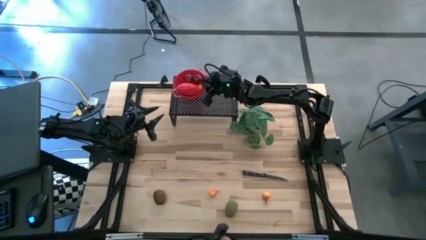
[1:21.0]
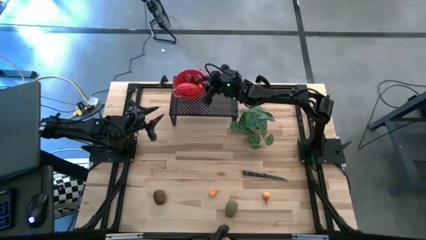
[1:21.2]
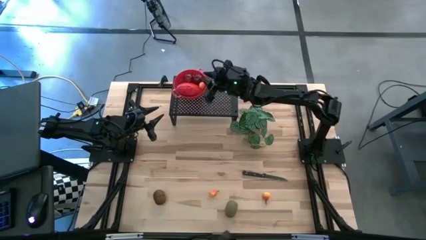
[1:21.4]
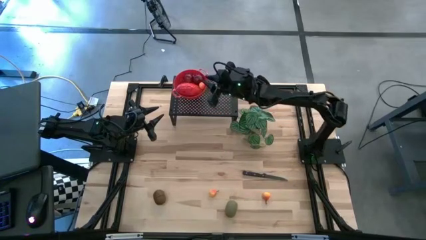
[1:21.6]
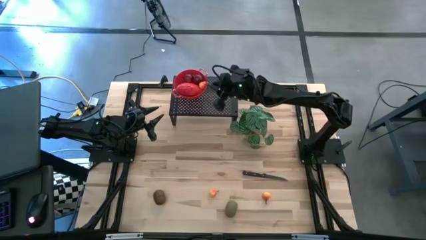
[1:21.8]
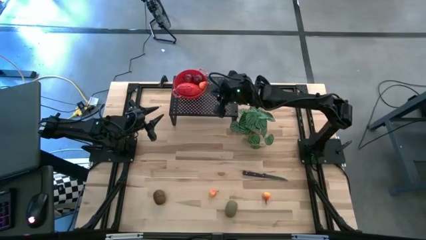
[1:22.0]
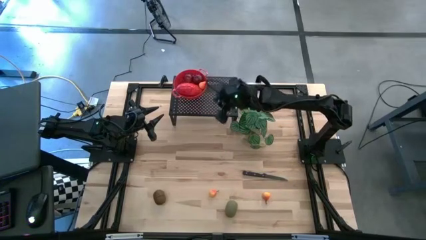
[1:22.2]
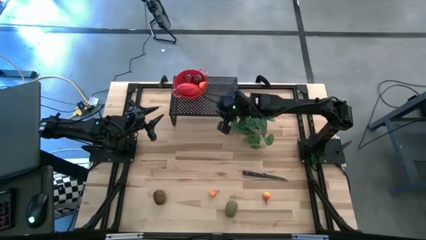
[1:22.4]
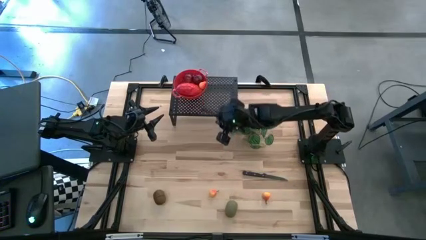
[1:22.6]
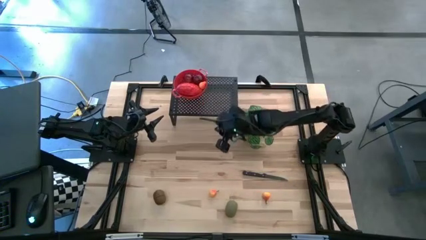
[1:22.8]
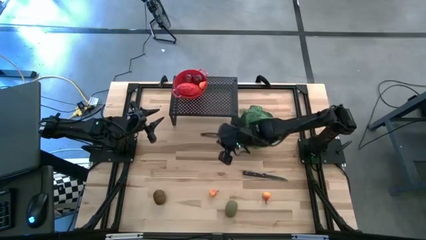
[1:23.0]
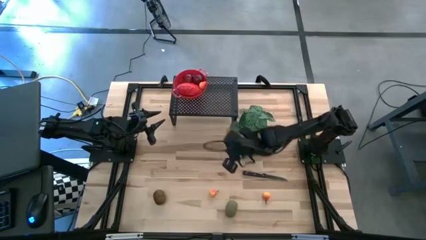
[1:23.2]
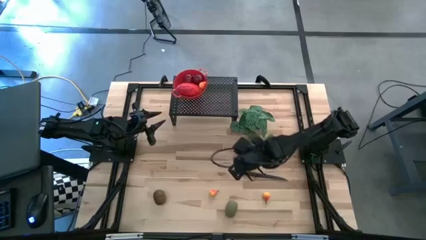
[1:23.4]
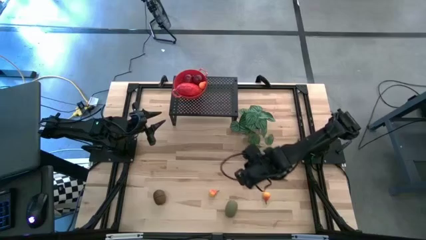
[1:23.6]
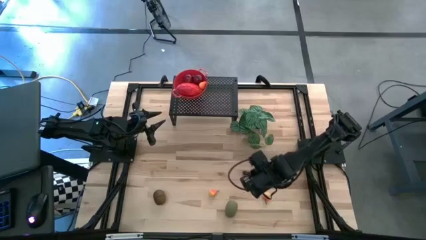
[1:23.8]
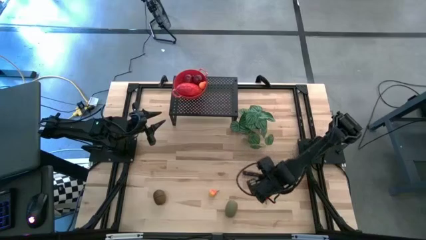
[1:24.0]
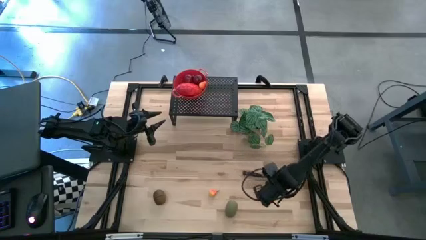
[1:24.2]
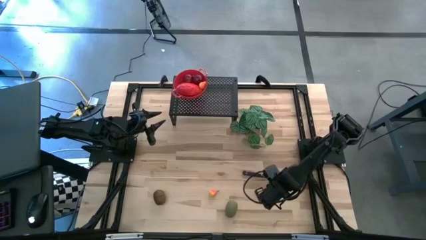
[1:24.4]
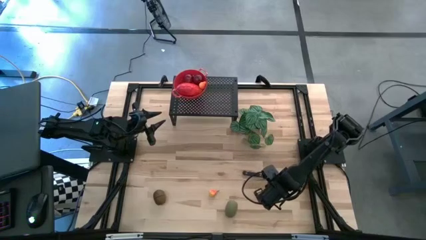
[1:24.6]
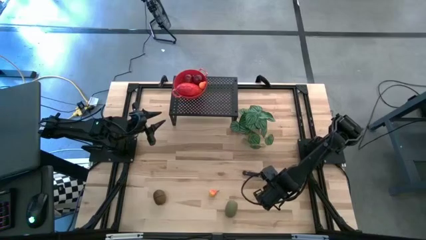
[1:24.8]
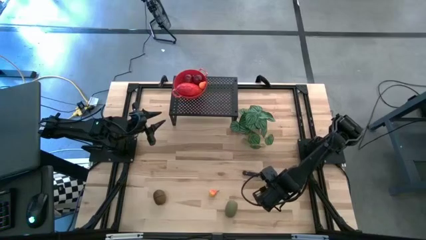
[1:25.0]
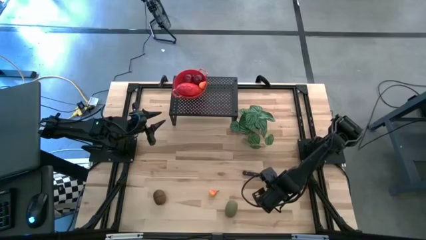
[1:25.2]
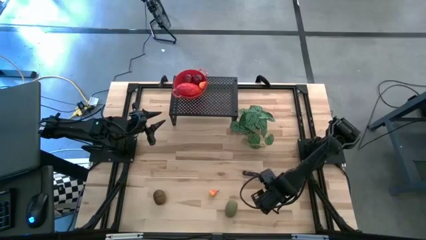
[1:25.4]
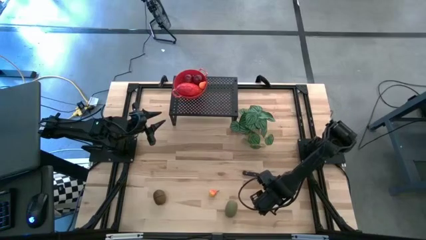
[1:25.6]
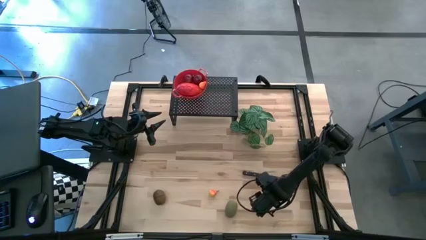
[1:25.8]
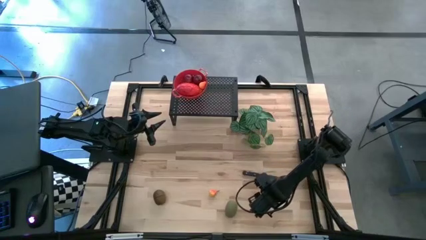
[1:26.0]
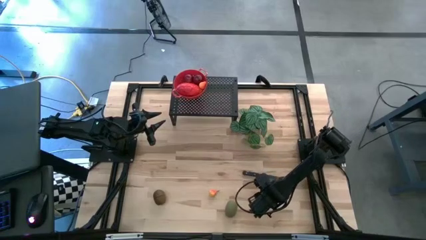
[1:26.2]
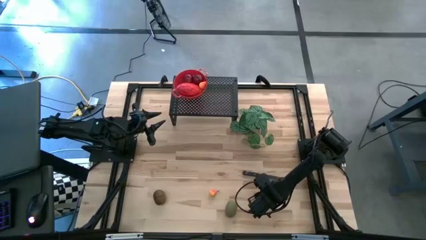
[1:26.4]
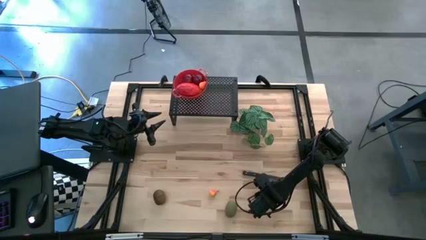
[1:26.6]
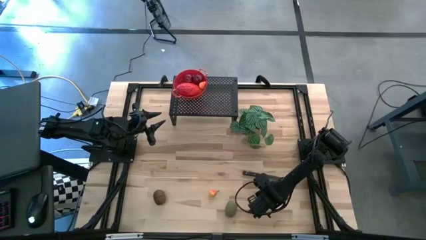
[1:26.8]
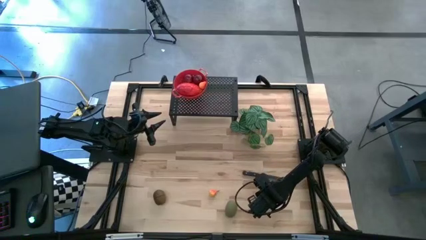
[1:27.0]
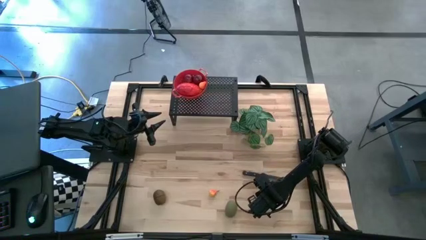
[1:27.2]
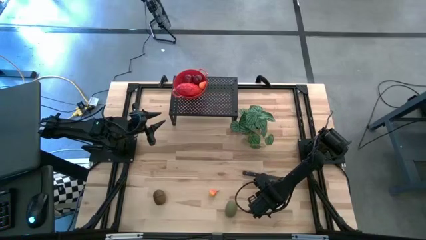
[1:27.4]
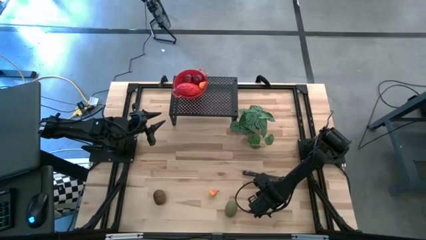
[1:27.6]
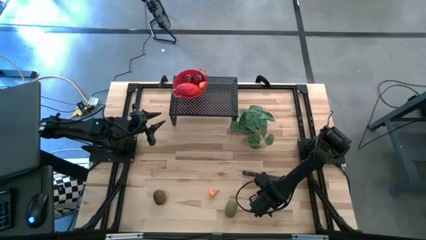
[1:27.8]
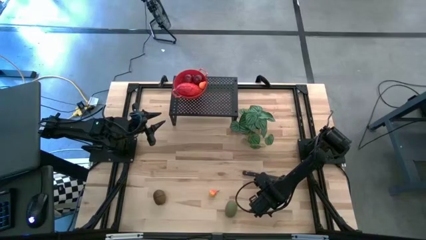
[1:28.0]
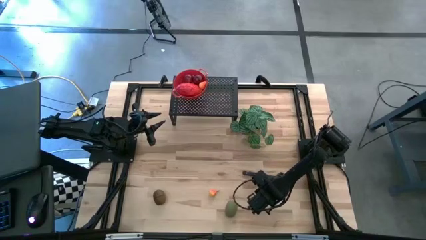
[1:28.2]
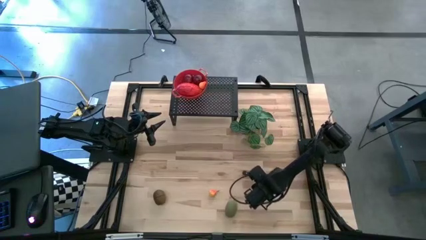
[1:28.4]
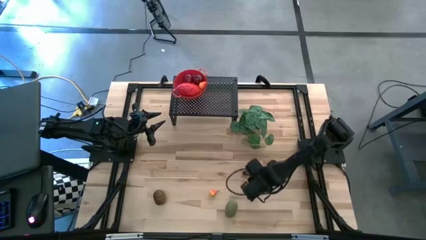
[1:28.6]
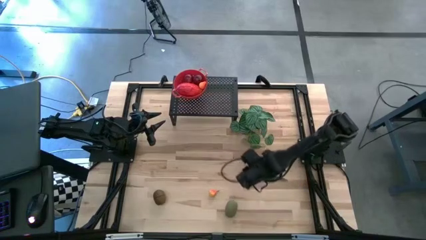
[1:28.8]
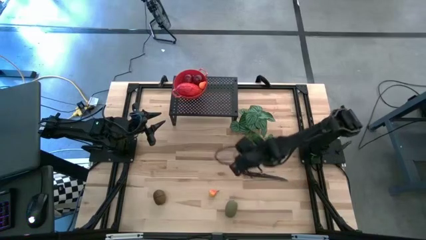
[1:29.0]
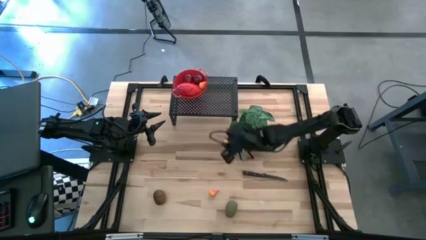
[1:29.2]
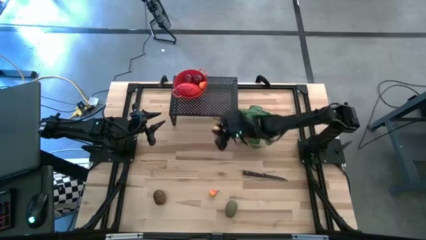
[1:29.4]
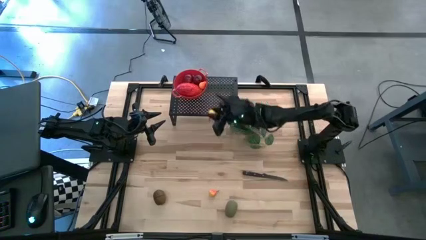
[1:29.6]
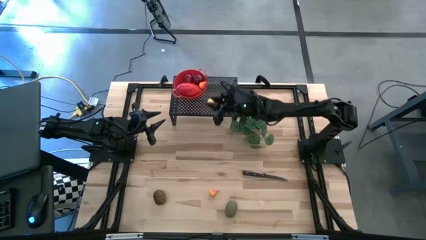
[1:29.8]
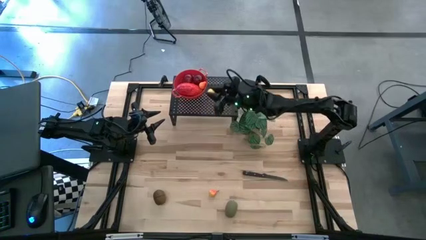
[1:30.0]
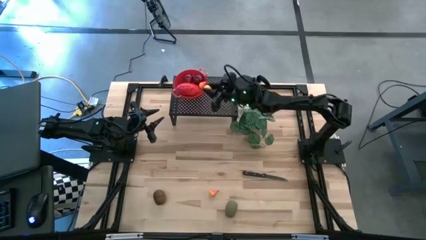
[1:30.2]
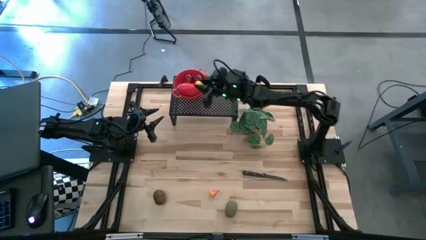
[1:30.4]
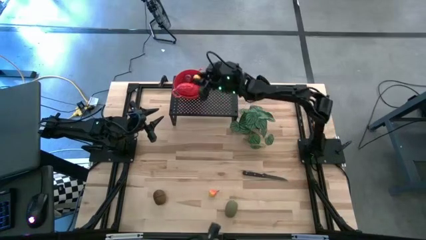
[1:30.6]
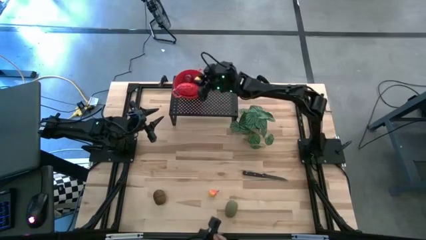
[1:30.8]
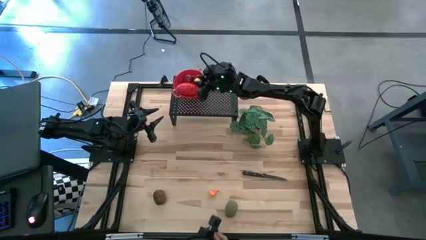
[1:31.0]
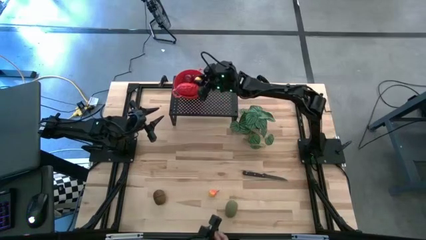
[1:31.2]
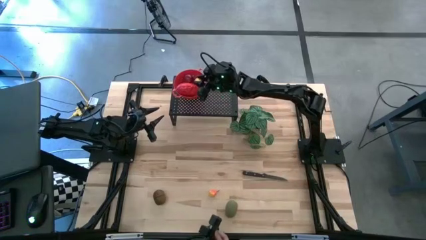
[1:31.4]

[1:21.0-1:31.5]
Task: Pick & Place Fruit
Put the right yellow pear in the red strainer bowl on the shelf

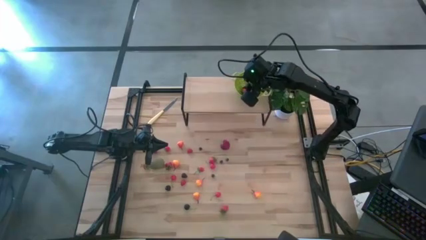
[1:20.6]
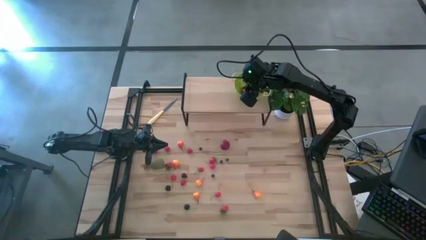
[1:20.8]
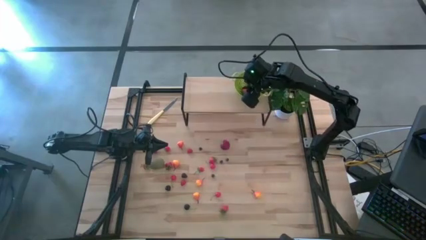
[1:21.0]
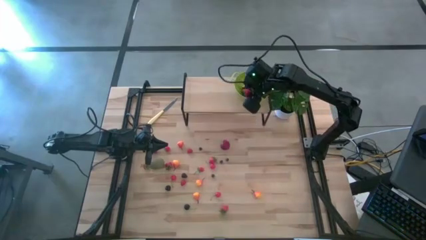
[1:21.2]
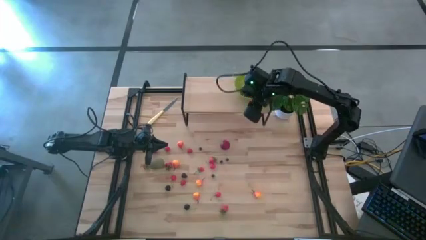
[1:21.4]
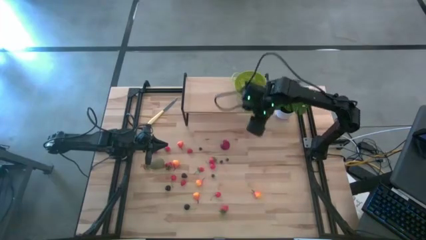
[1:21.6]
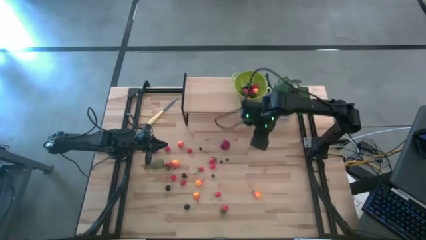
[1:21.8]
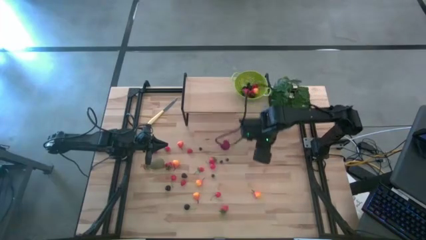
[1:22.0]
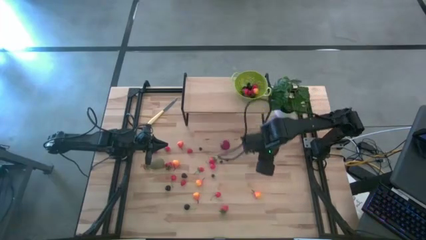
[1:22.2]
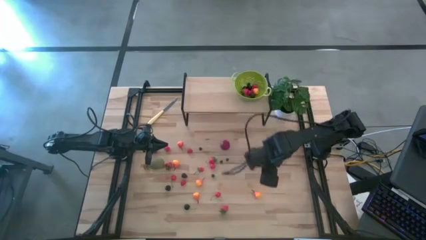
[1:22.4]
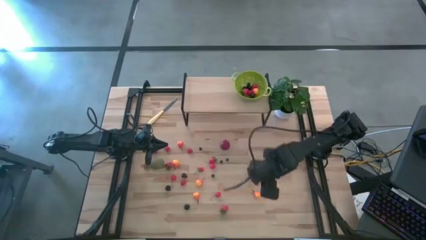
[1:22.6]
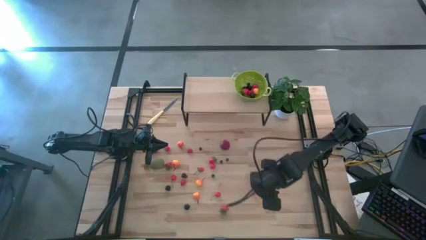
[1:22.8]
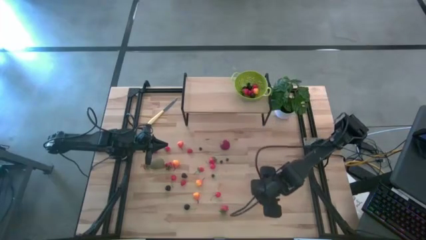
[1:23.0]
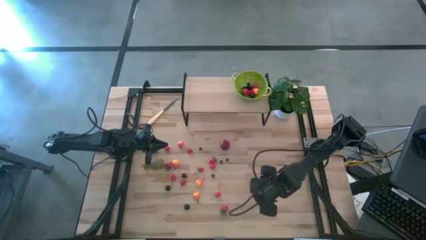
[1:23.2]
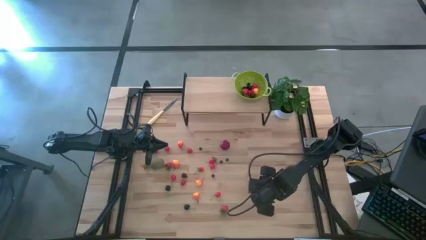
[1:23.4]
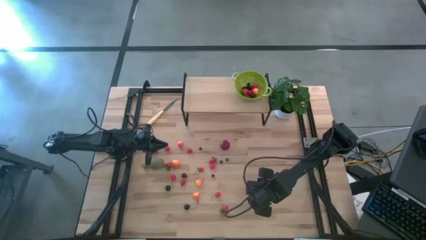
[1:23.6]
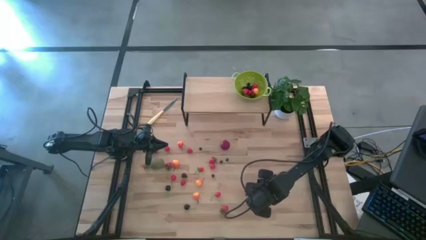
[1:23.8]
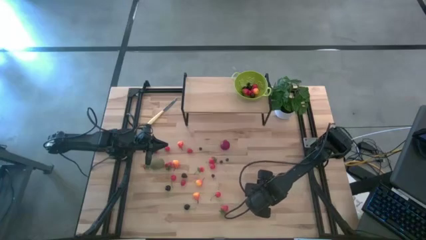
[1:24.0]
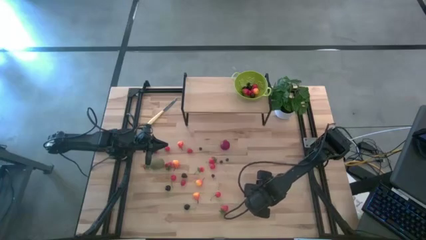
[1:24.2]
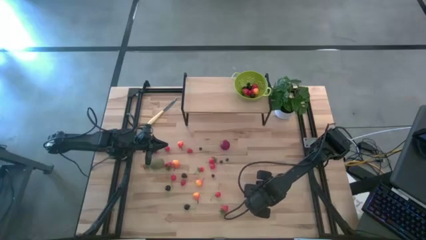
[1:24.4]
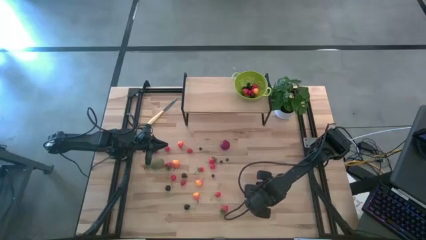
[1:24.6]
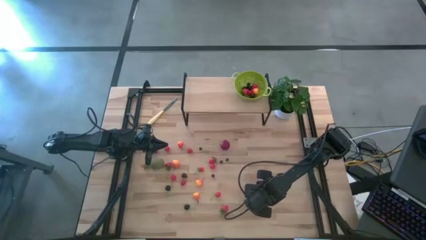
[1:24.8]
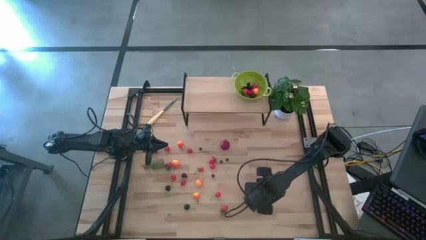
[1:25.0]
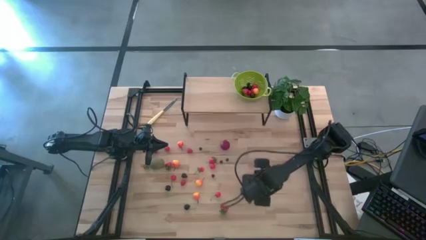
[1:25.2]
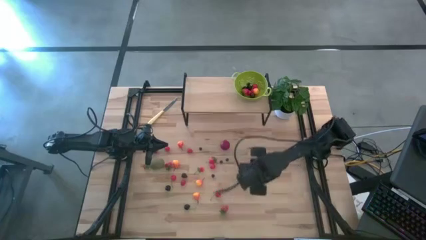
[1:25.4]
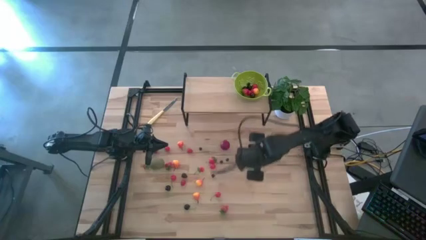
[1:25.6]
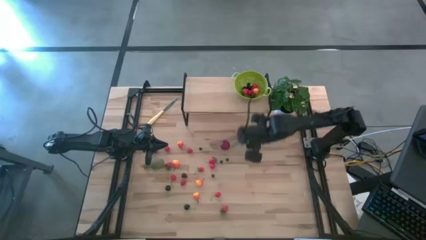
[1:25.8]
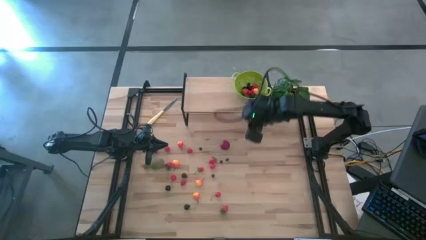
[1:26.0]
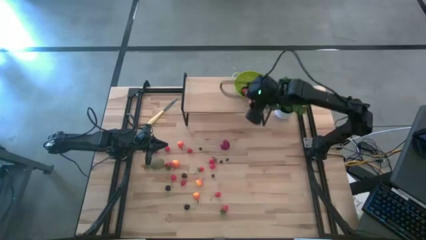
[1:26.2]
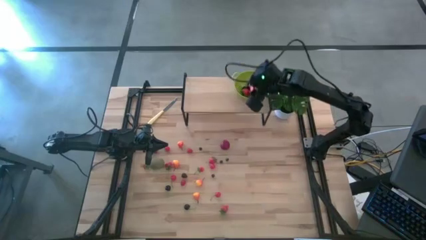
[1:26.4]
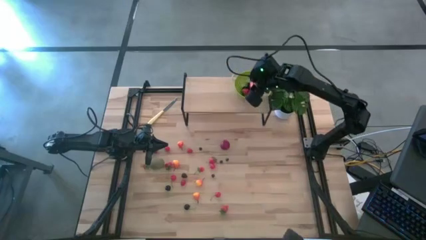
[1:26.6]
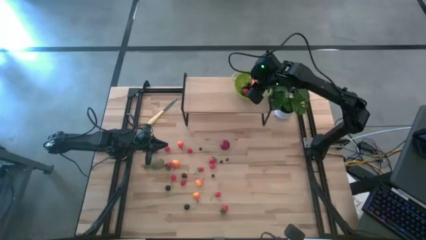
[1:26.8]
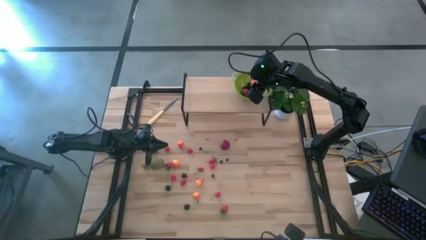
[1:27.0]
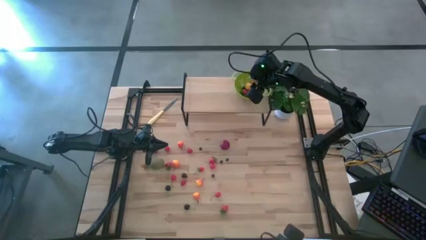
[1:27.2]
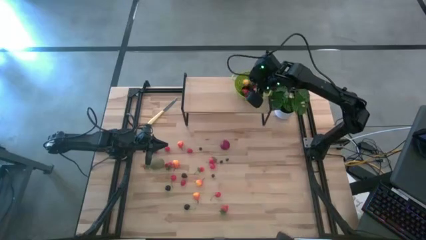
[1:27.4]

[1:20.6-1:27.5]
Task: Build produce basket
Put the pear into the green basket
